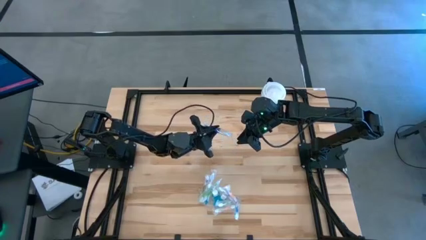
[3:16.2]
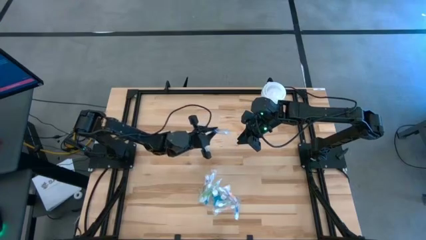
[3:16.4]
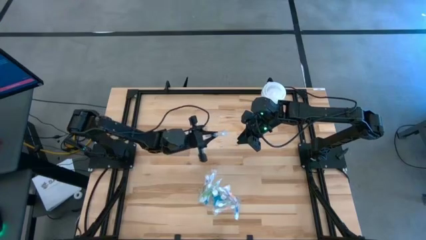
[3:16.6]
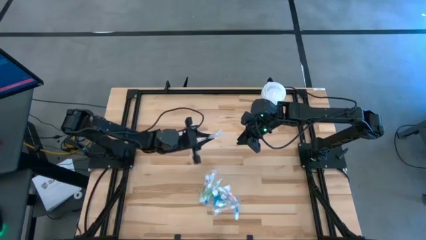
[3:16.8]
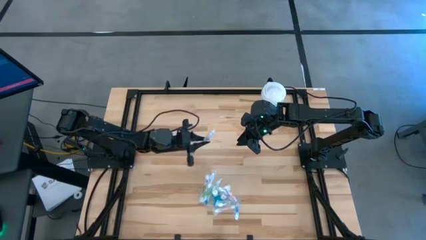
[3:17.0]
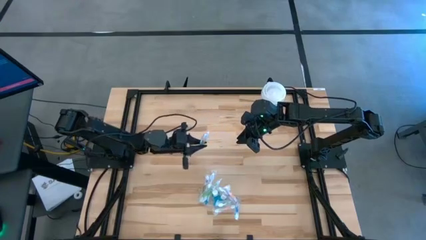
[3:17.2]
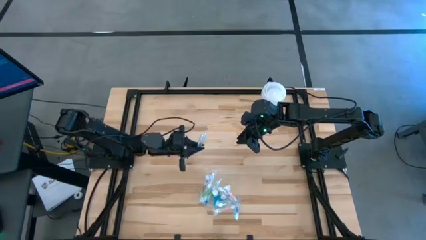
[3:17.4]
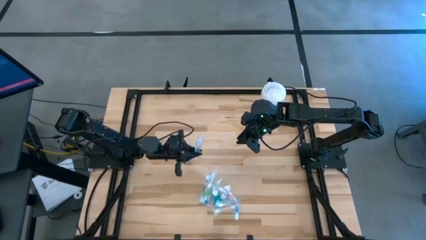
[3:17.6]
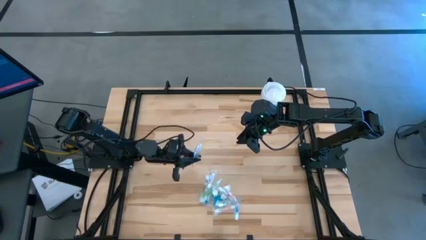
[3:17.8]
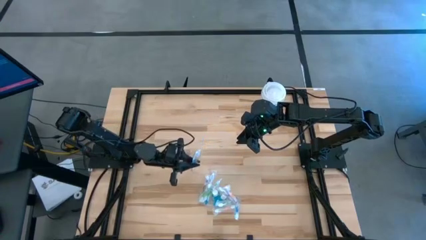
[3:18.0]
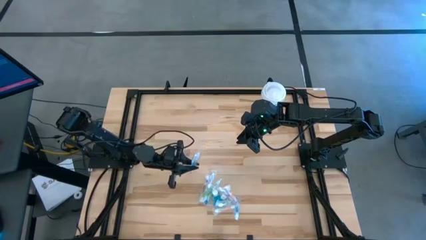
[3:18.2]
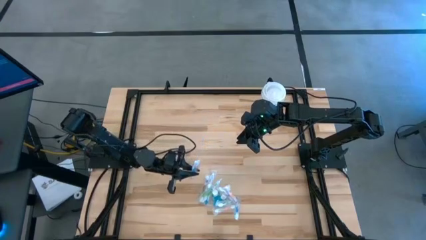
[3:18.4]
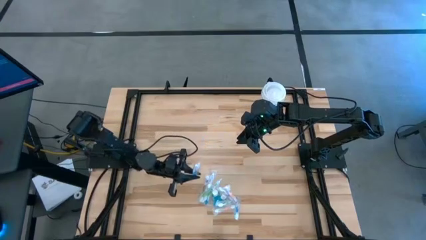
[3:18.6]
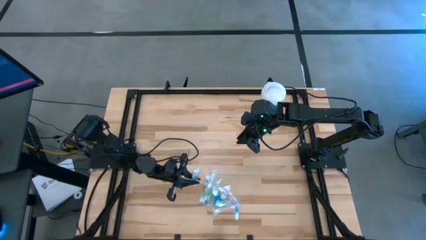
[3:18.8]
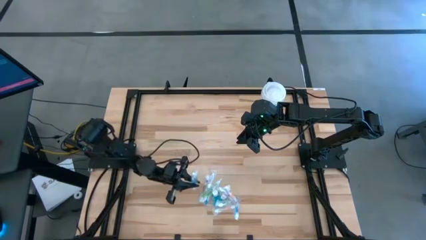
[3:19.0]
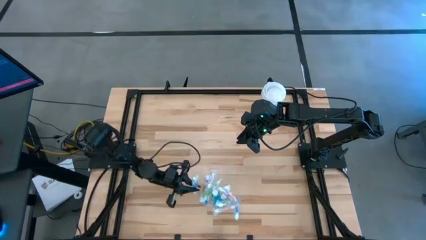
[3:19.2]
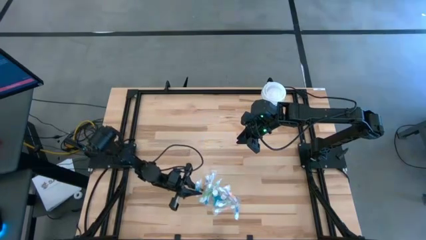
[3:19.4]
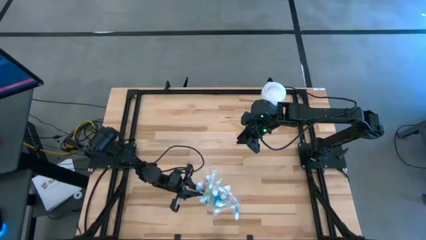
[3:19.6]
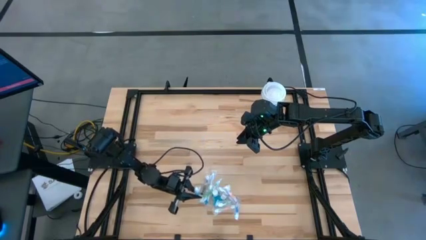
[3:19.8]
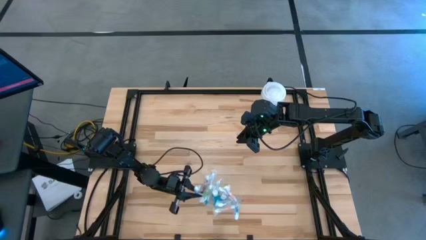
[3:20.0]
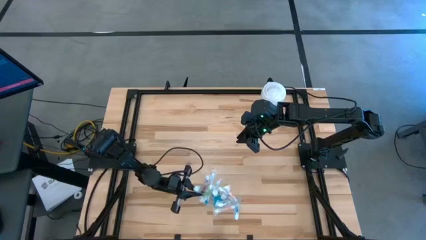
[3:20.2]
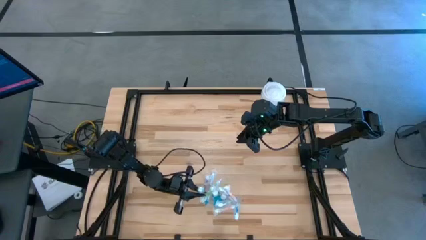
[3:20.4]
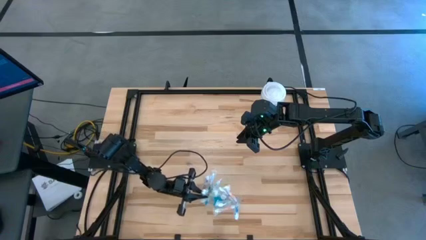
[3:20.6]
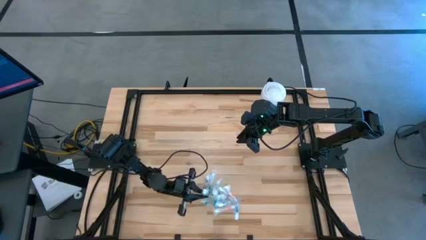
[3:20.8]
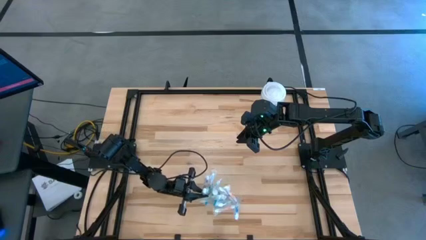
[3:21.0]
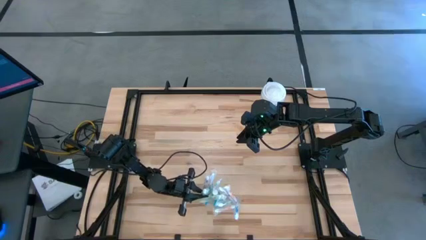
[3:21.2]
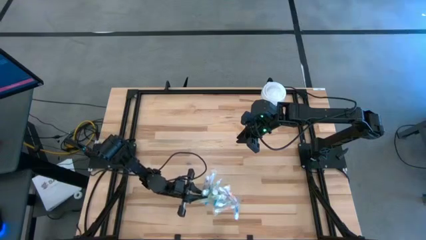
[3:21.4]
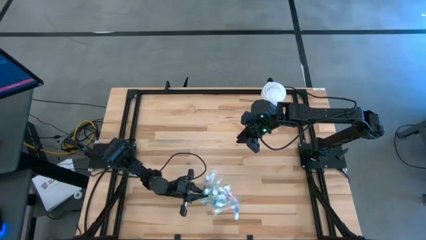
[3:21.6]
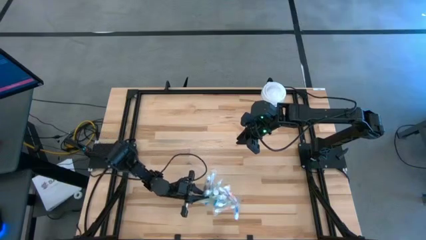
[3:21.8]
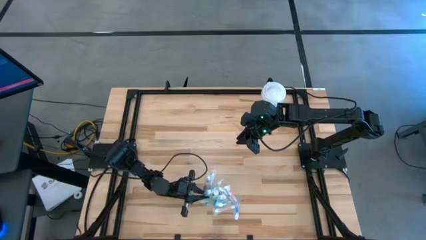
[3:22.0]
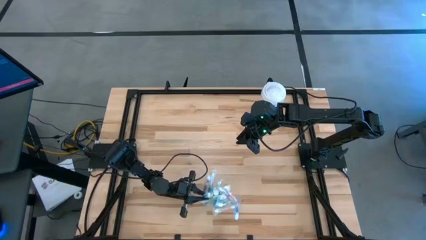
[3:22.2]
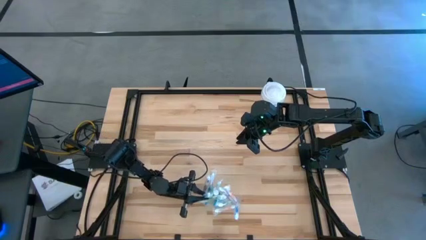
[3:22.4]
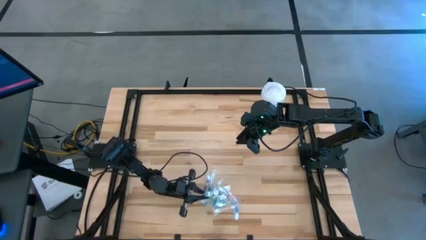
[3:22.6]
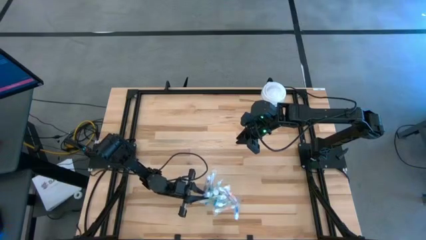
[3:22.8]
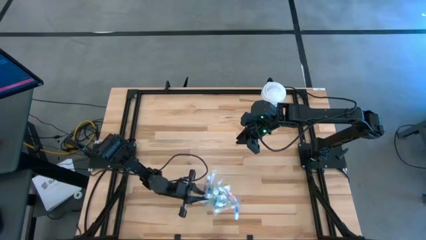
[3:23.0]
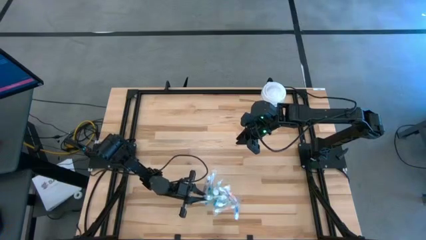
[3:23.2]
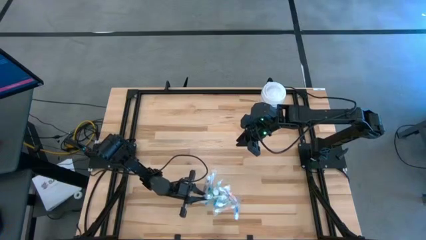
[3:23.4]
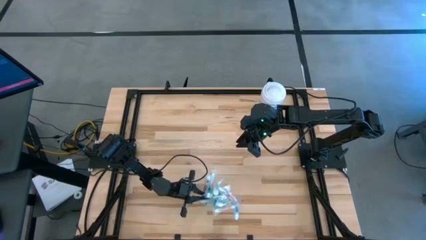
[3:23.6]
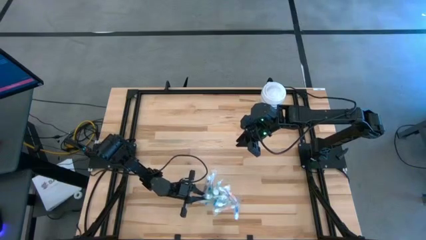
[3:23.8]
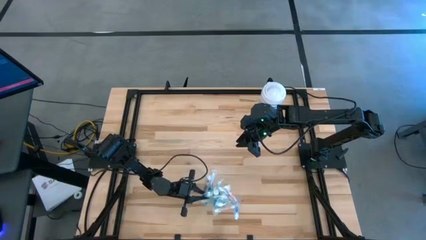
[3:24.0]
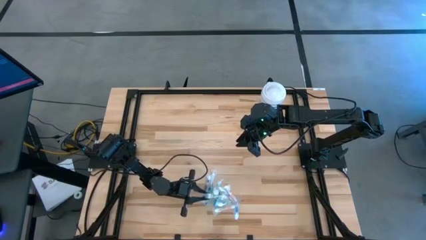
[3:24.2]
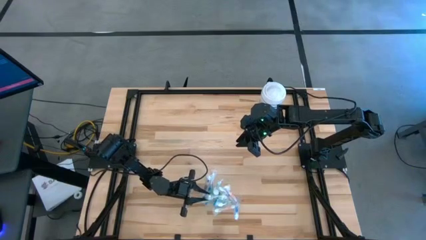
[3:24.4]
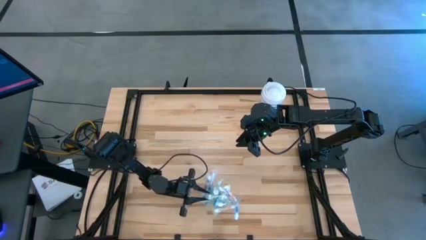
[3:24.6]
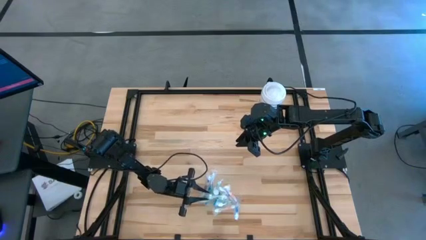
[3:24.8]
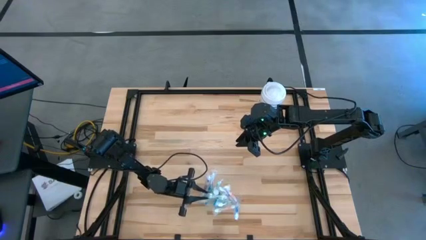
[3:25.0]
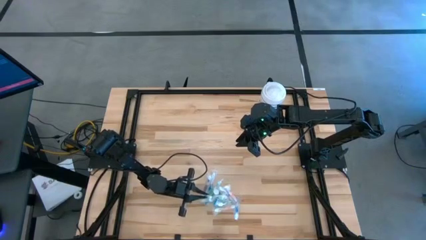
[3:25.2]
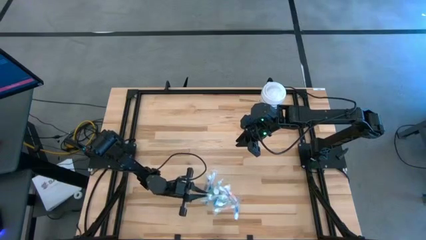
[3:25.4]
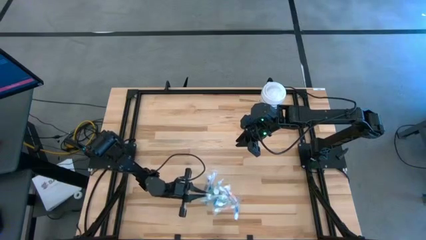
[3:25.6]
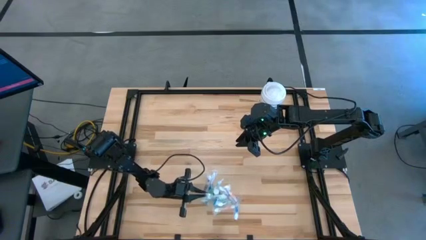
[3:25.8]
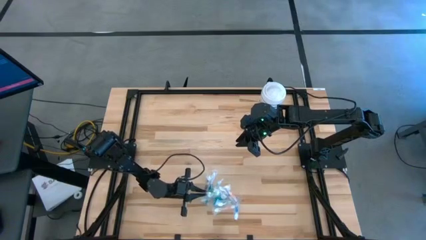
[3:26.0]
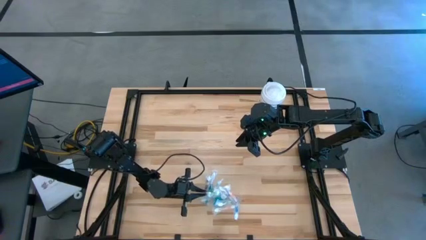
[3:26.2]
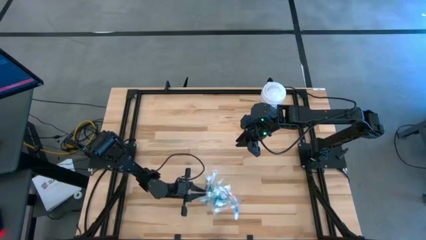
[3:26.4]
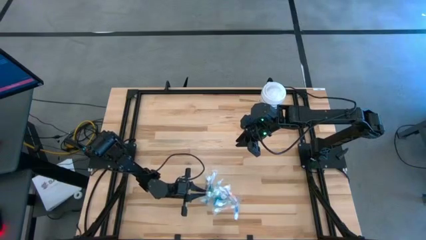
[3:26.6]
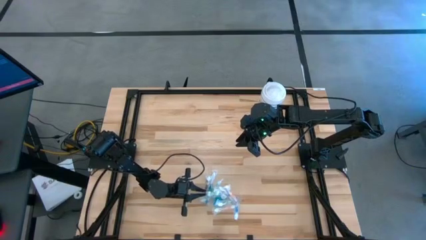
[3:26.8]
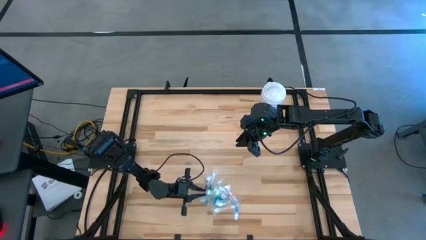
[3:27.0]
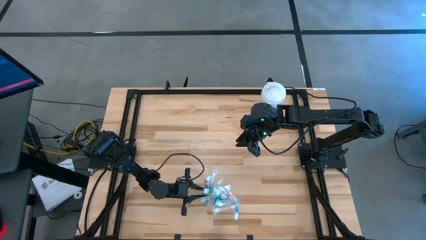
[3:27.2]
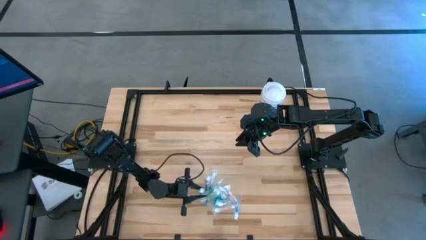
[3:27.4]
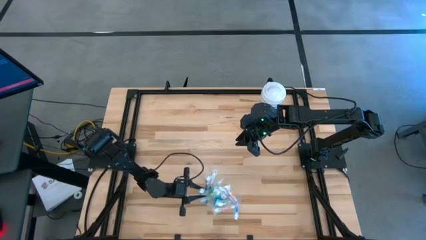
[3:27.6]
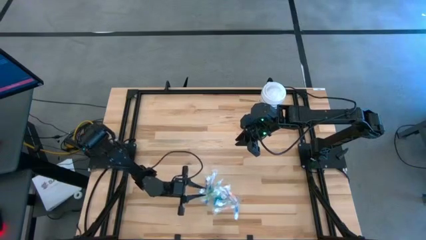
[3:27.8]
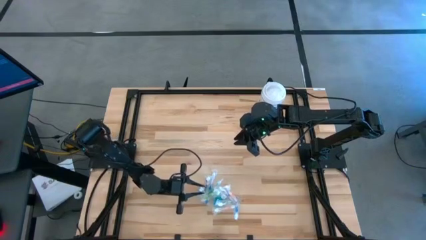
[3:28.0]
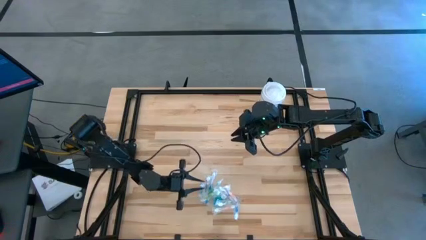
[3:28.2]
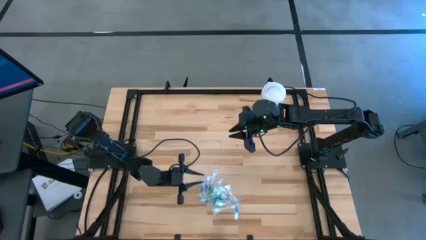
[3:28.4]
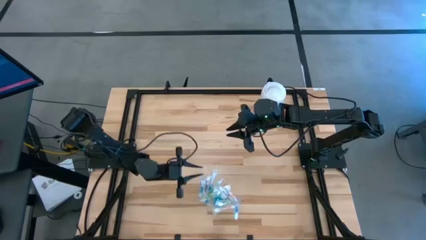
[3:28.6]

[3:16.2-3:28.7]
Task: Pick & Place toothbrushing station
Put the blue toothbrush into the transparent organizer

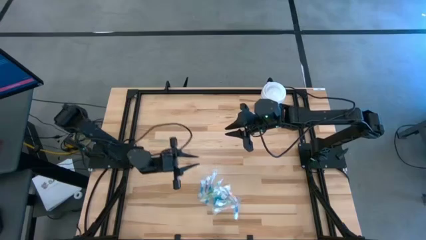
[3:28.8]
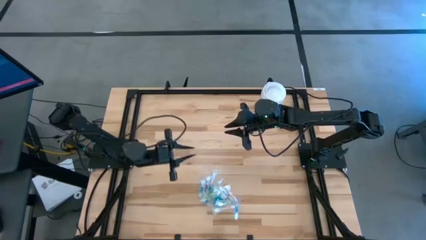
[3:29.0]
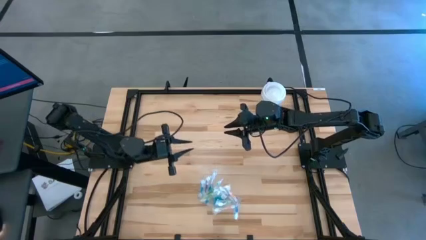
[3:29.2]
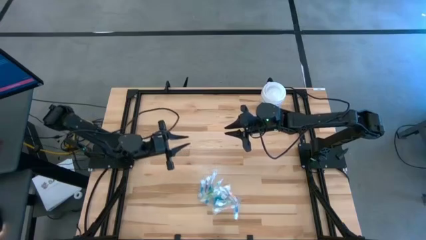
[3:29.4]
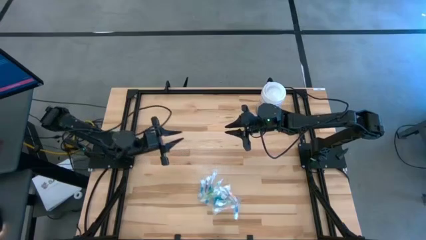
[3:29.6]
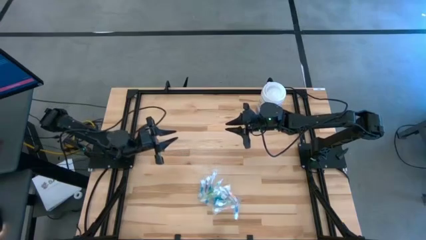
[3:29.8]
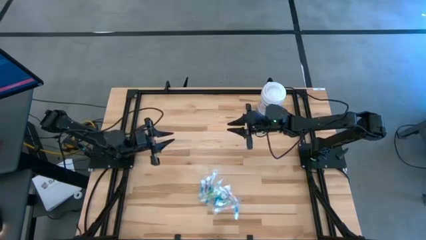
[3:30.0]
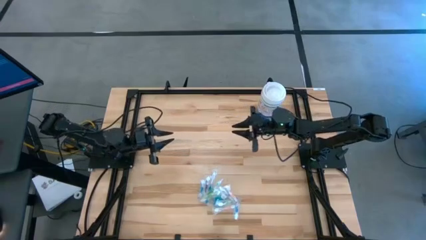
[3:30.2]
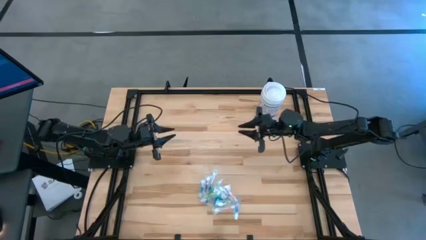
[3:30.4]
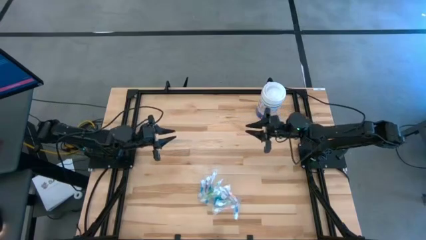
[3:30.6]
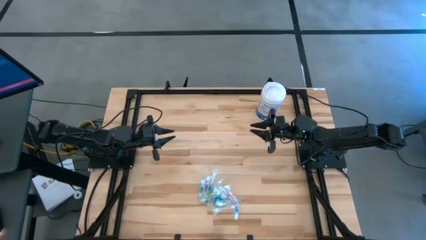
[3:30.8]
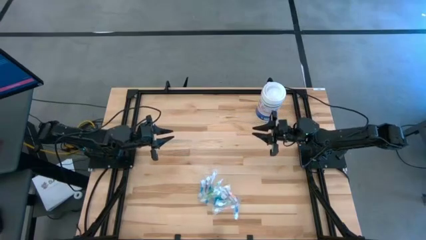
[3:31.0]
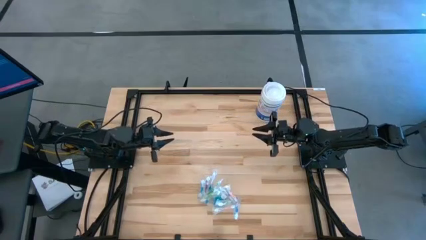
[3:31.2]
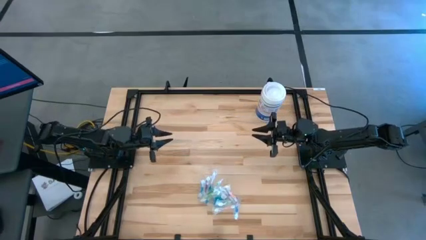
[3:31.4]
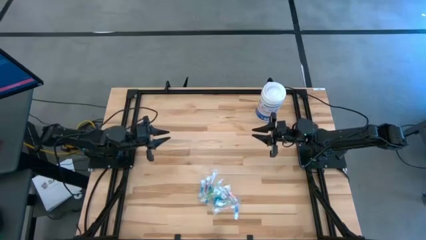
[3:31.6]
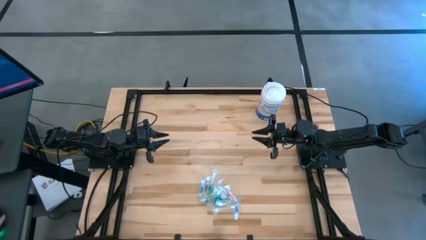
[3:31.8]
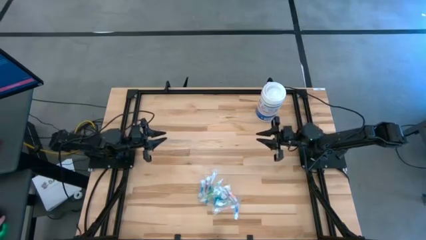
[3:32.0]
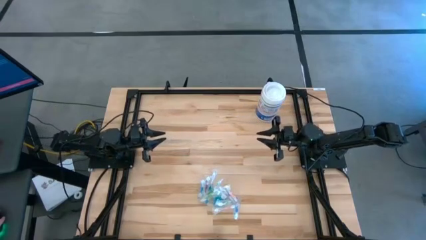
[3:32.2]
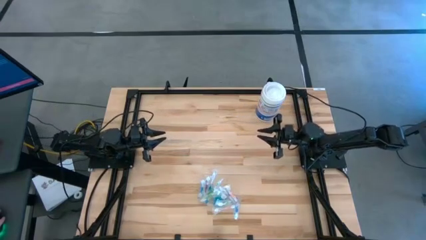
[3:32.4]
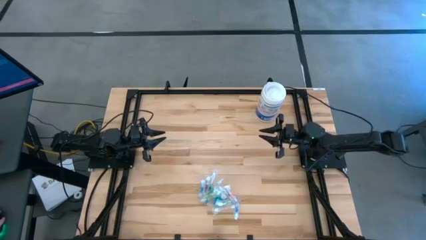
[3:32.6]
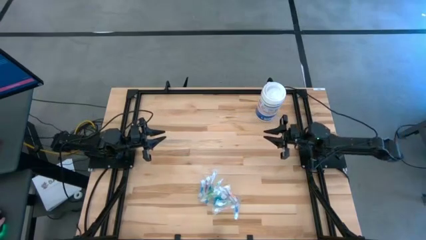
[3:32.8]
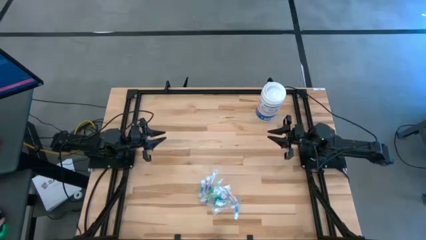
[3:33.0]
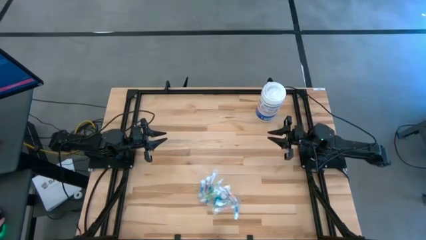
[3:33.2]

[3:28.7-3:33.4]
Return to Home Position
